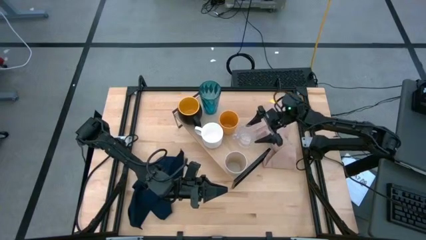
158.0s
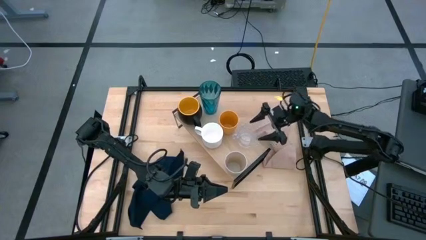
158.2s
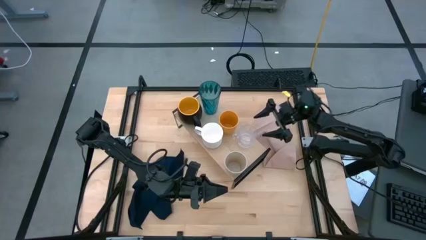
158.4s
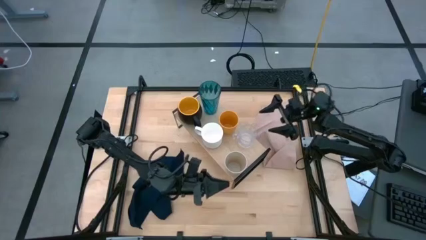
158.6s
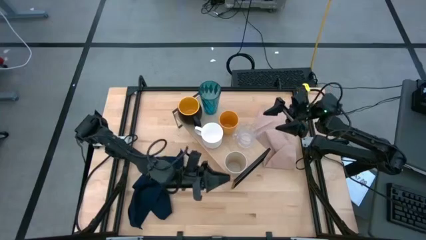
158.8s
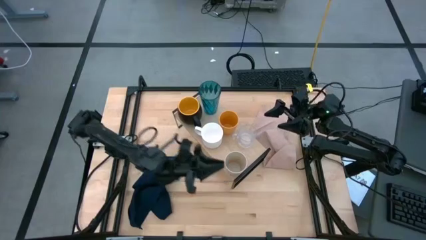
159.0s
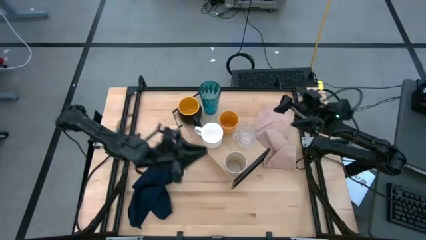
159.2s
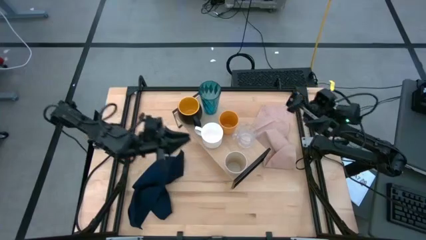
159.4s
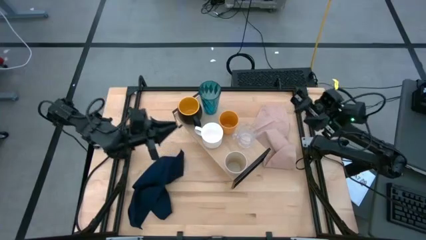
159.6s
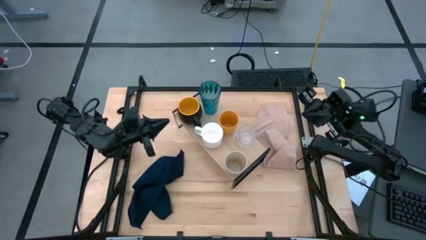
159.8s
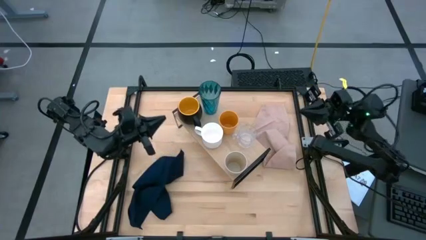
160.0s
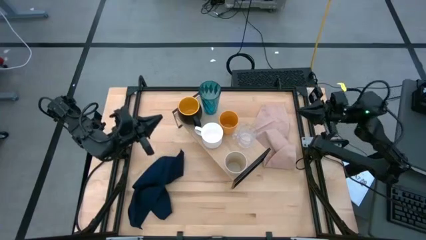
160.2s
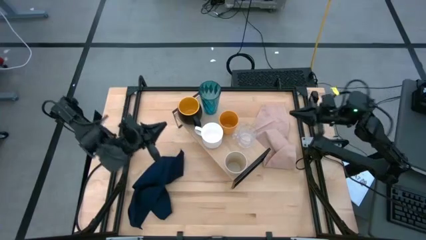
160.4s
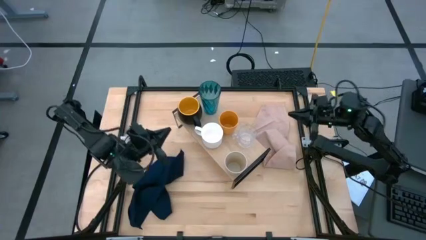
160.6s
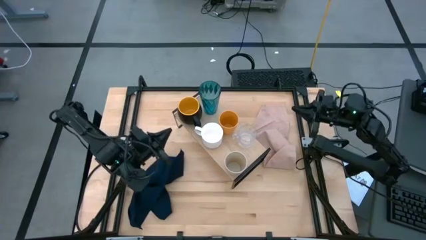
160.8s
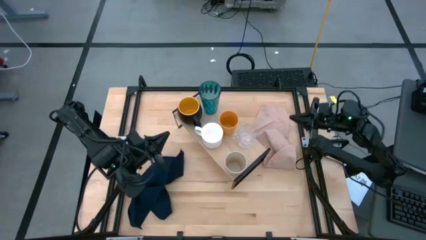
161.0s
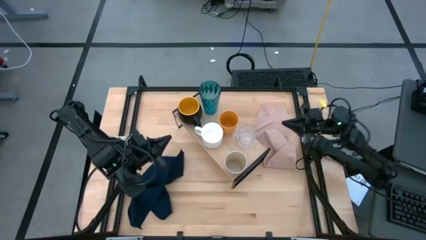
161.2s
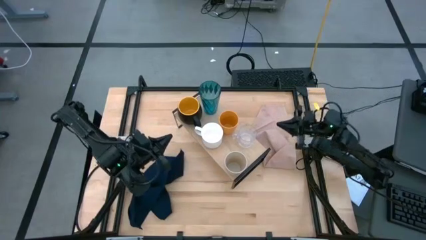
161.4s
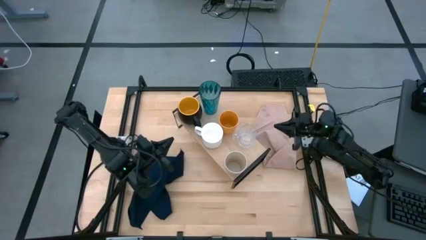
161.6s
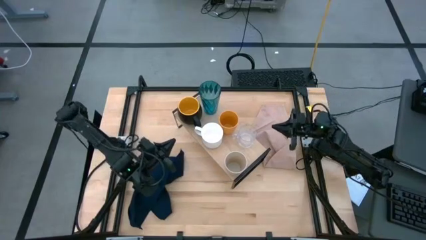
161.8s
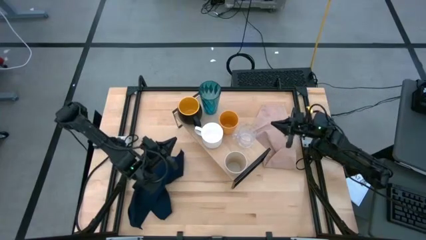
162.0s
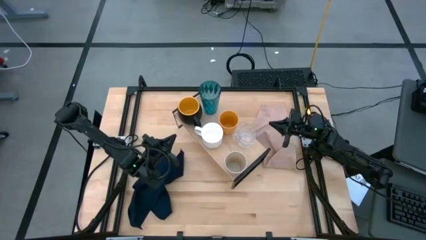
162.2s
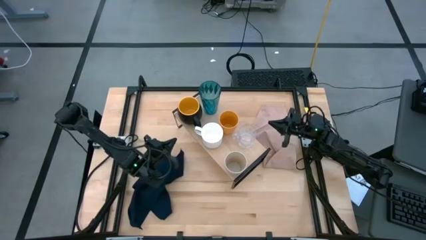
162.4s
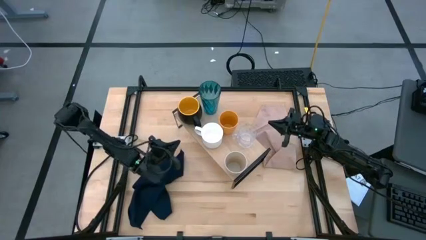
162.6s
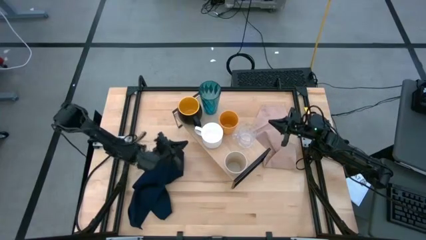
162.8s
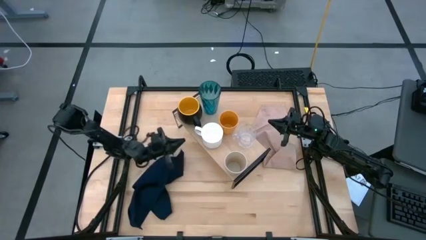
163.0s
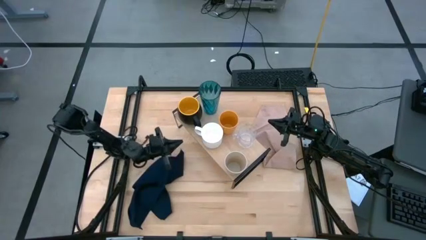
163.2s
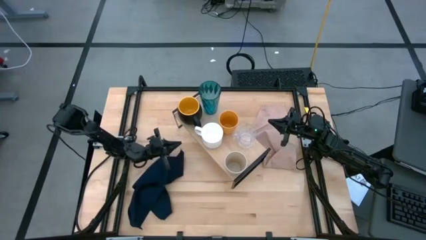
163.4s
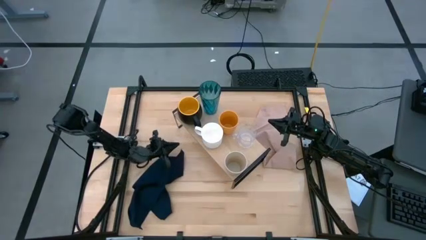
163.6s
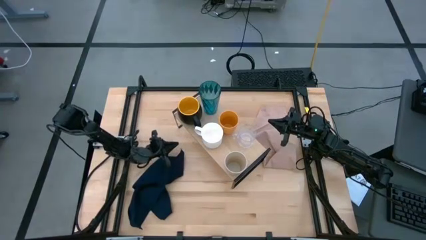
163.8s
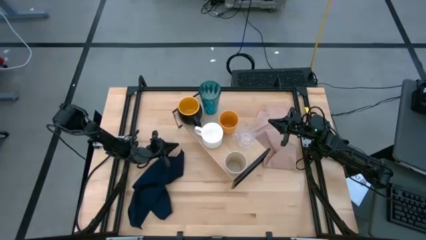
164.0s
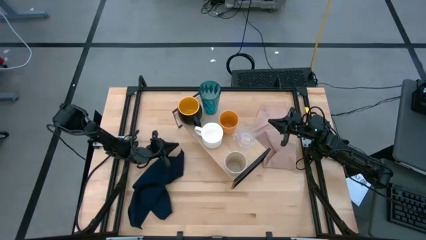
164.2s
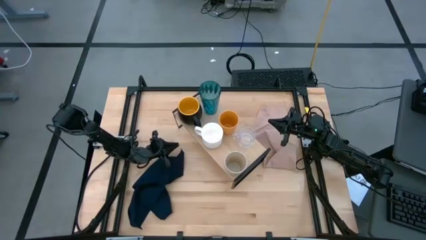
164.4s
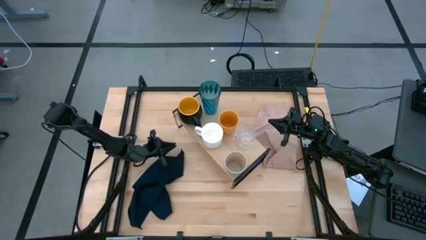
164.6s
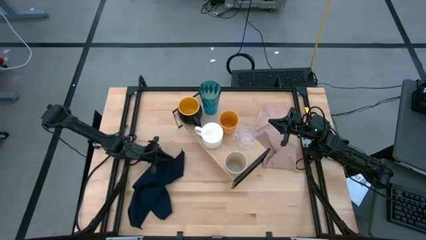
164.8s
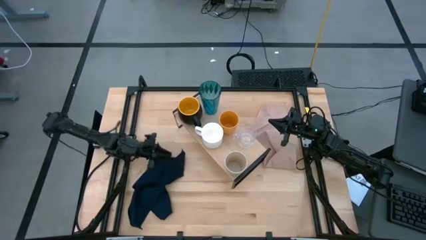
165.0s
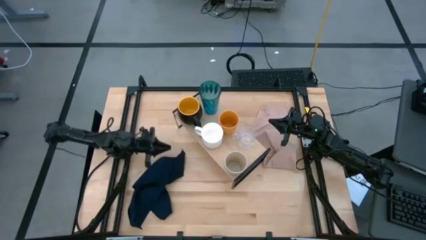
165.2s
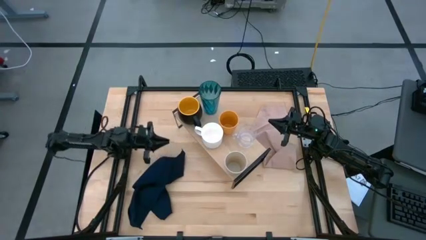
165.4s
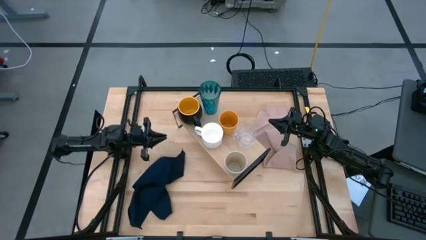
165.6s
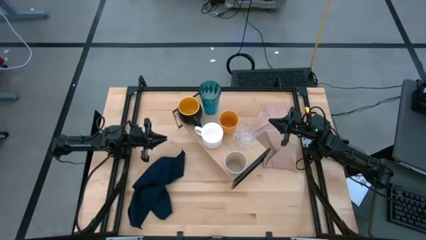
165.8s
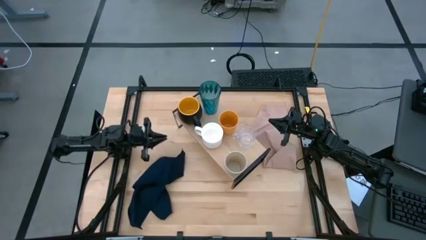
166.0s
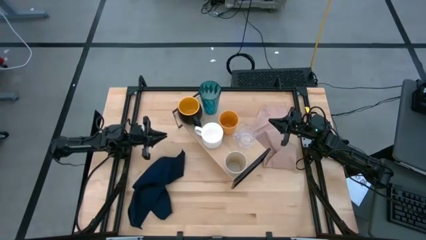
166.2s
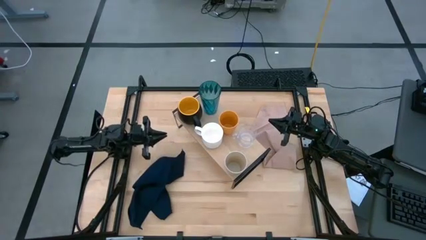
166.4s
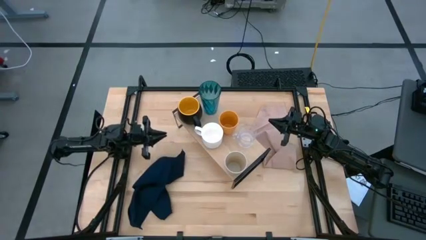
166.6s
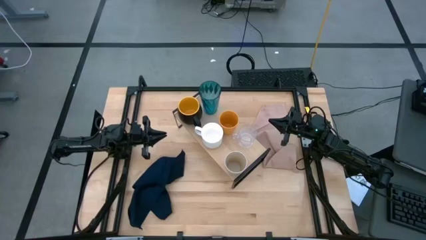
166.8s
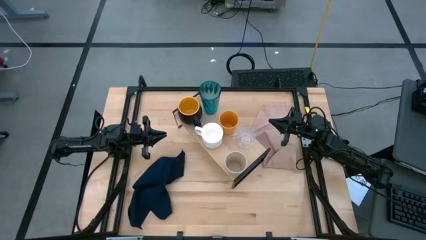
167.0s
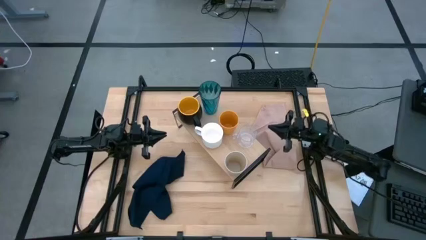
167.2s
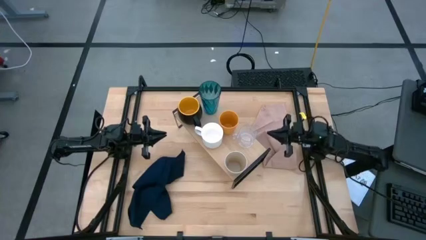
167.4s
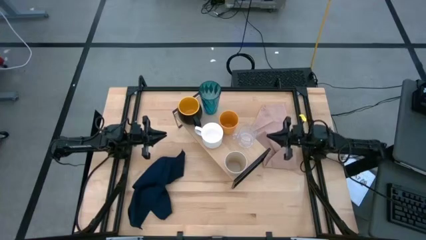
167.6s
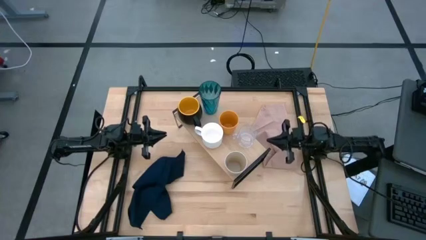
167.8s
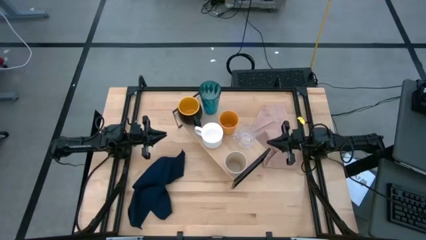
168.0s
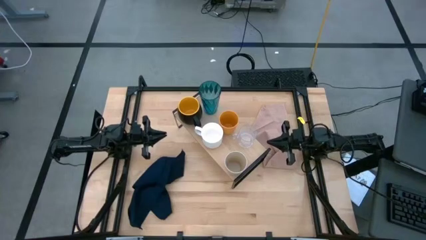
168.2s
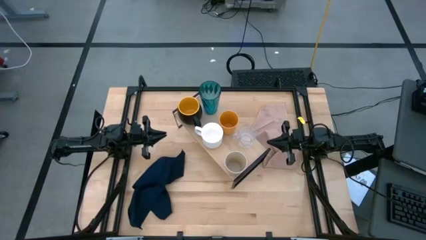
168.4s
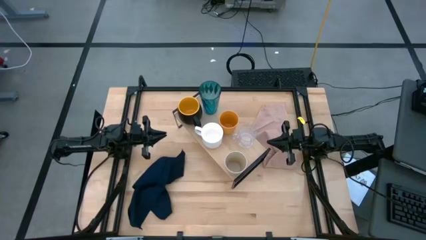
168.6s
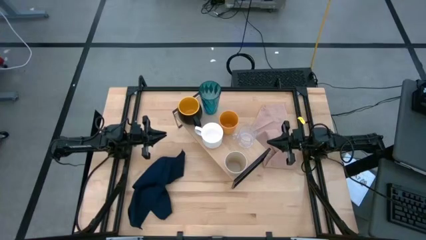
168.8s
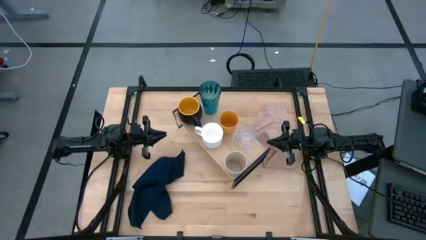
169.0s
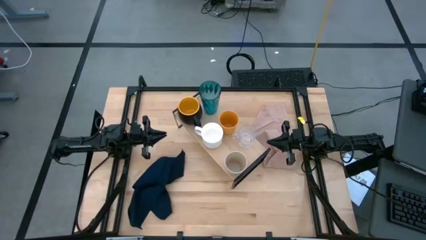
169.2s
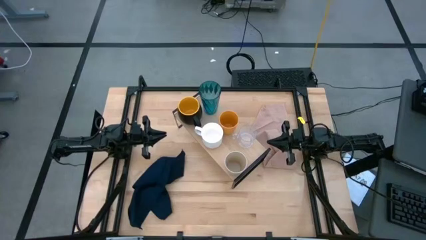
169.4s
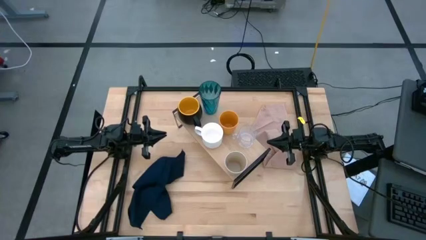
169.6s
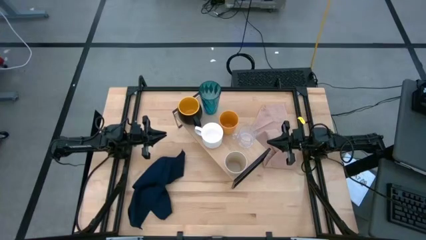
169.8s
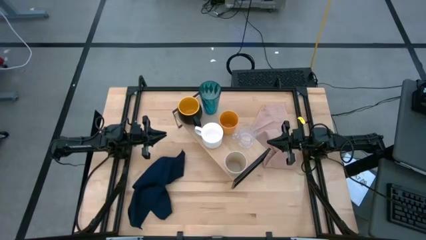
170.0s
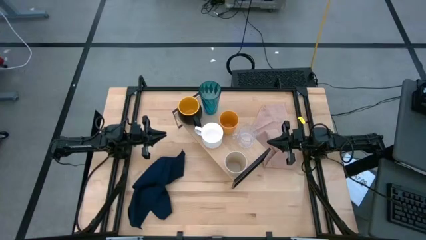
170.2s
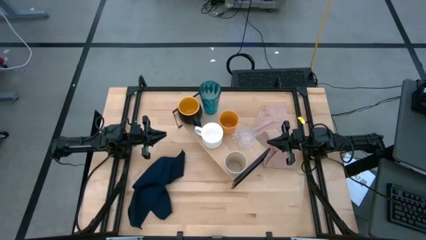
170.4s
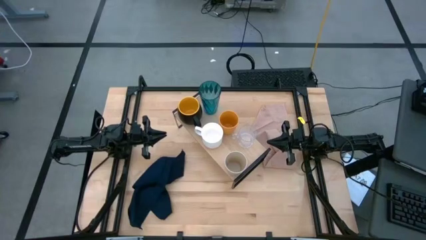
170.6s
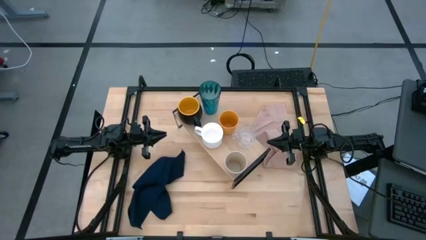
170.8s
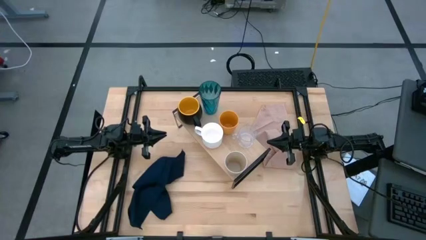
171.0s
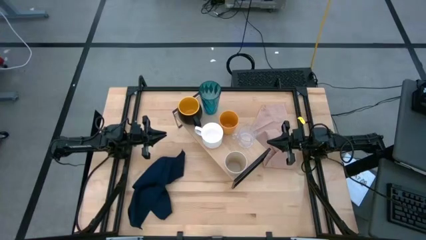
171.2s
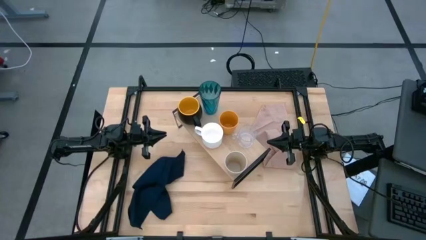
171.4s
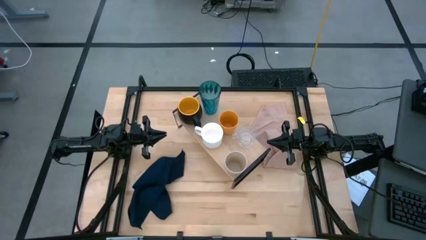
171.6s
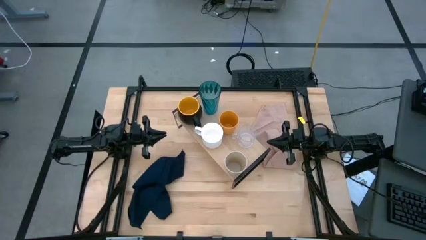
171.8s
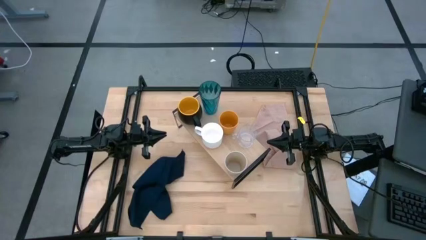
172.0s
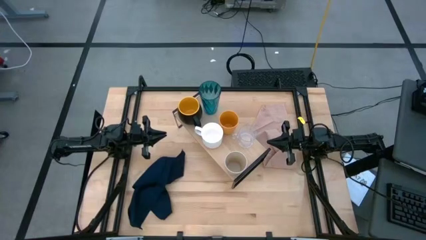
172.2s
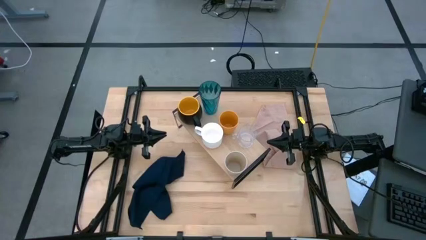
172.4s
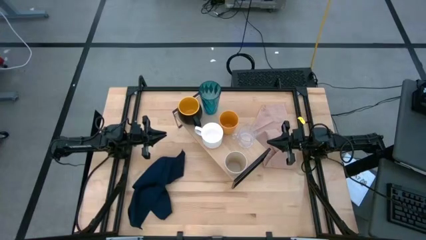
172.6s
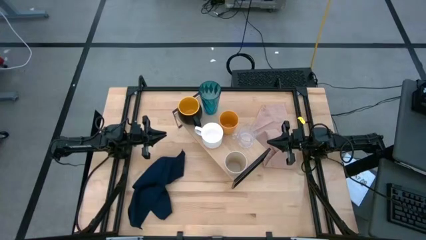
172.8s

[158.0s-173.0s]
Task: Stack small to large cups/mugs on shelf
Return to Home Position
